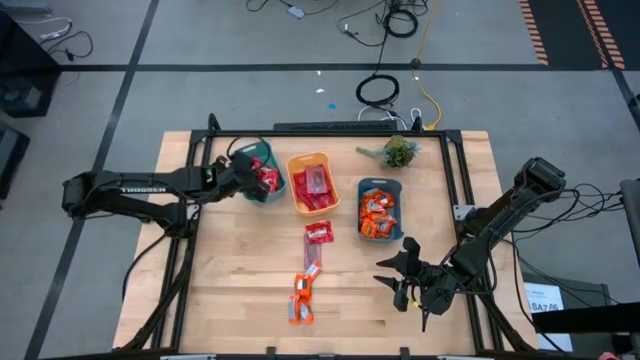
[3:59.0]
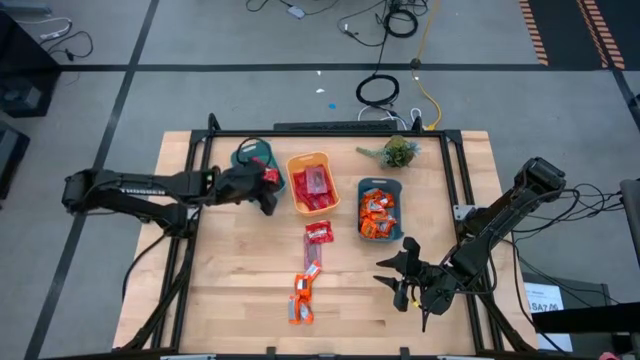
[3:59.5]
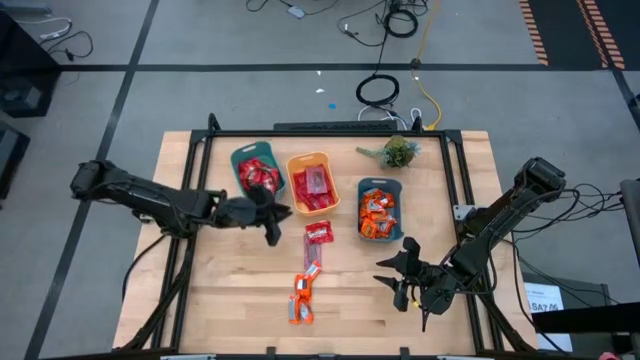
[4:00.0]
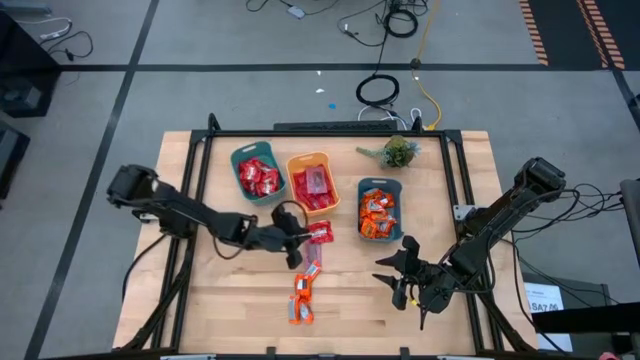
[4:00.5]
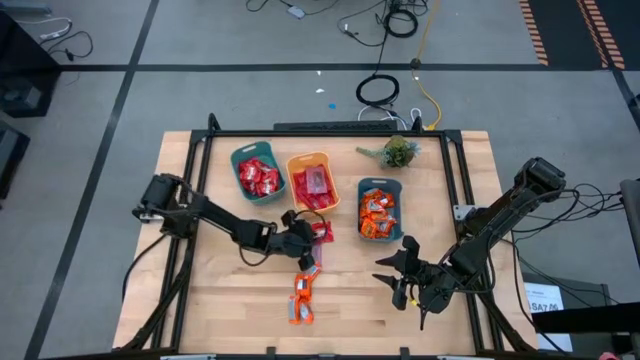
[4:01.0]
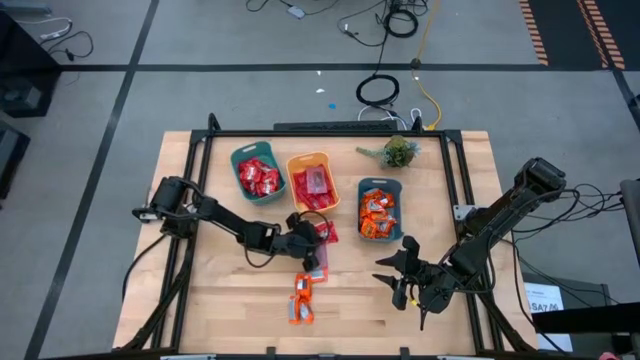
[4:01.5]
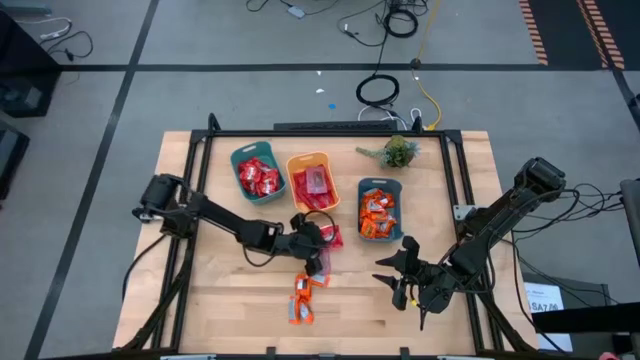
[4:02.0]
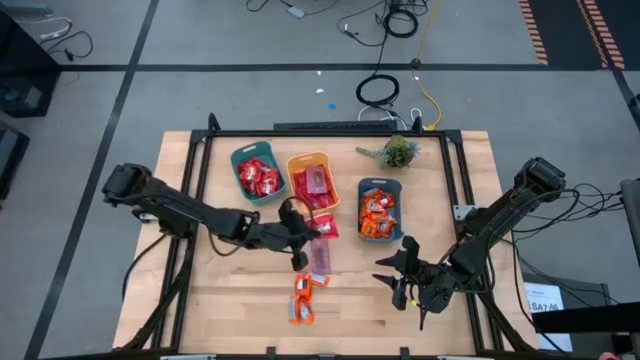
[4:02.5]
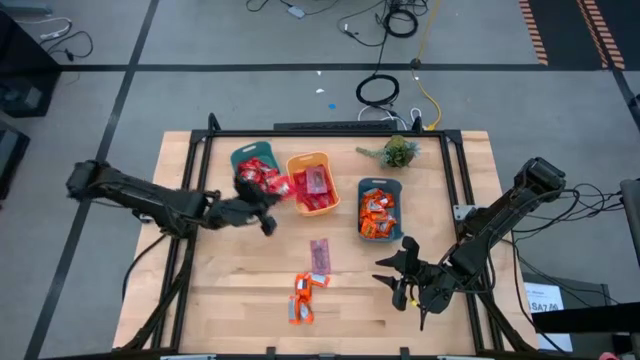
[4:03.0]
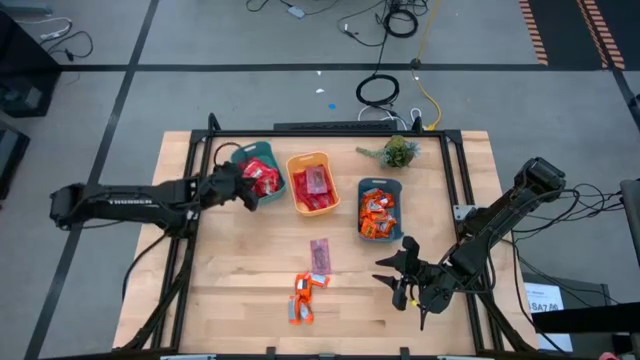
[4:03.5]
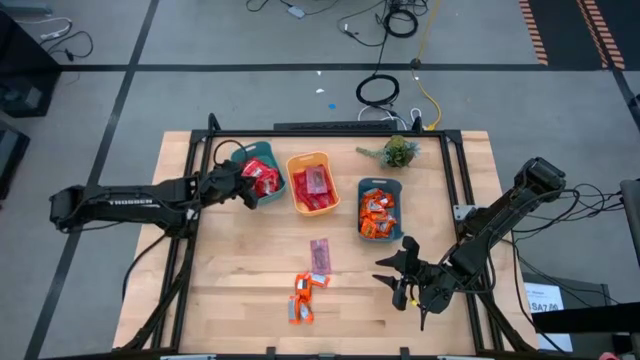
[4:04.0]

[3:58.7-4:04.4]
Task: Sort candy
Put the red pack of candy into the light blue bin

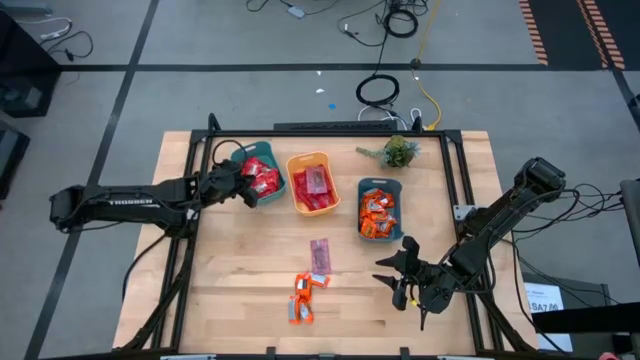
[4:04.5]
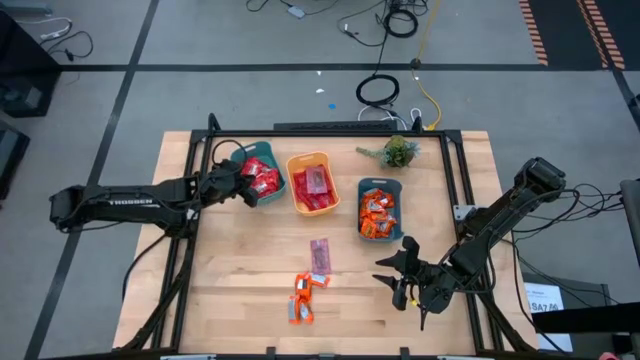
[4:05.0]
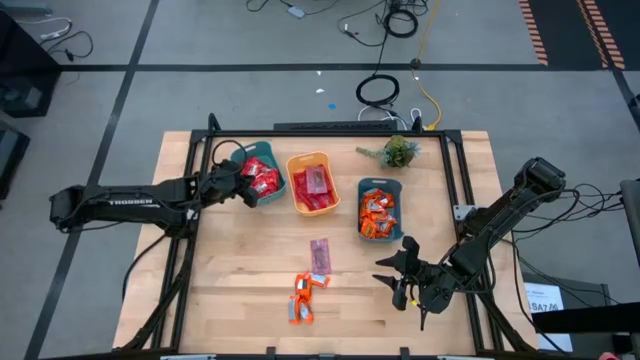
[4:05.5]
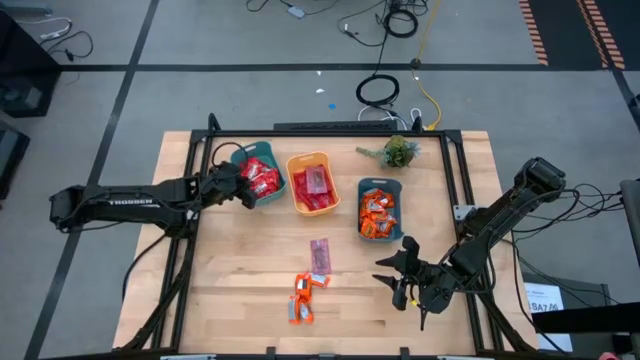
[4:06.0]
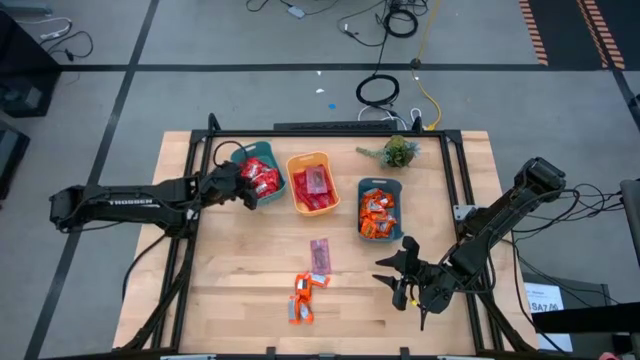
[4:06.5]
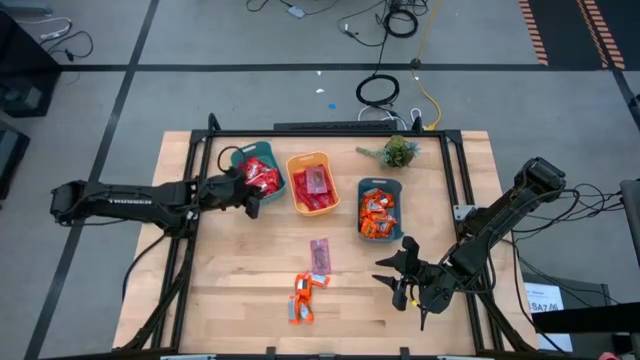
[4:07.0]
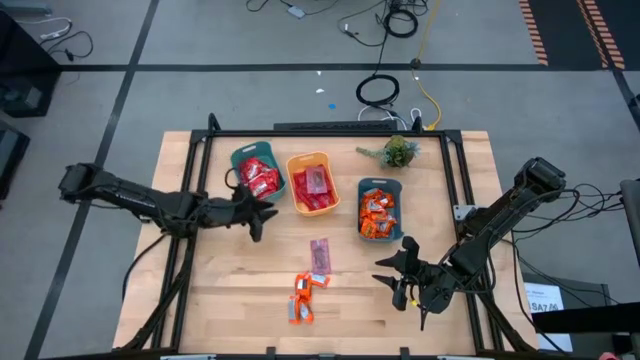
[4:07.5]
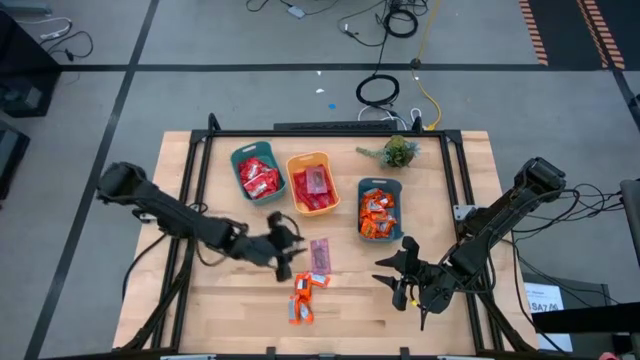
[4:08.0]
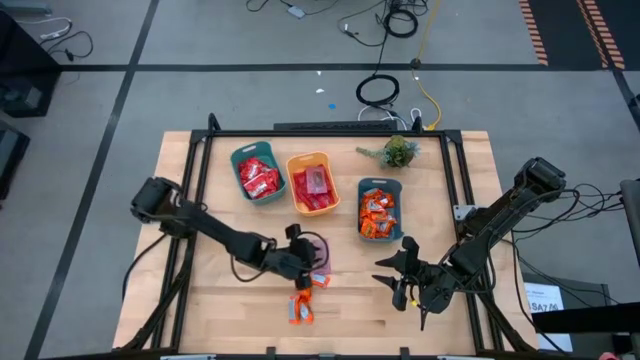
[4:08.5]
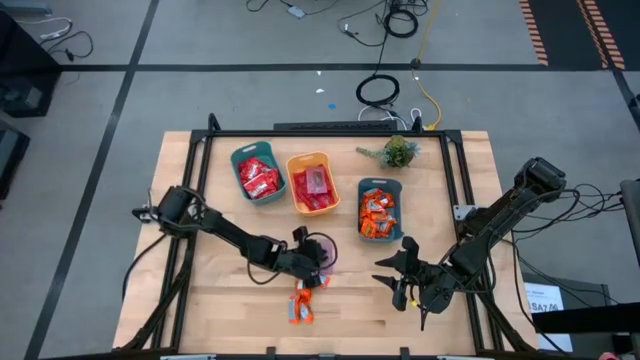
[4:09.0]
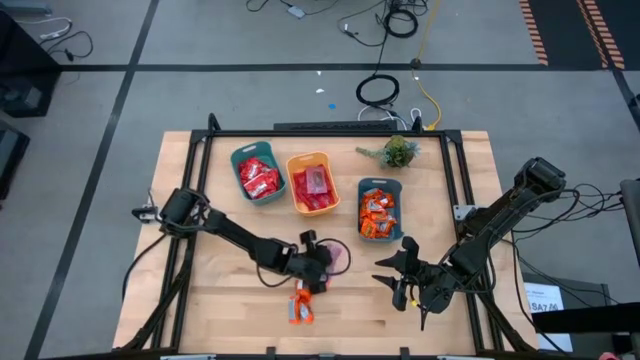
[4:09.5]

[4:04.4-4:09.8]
Put the pink wrapper gummy into the yellow bin

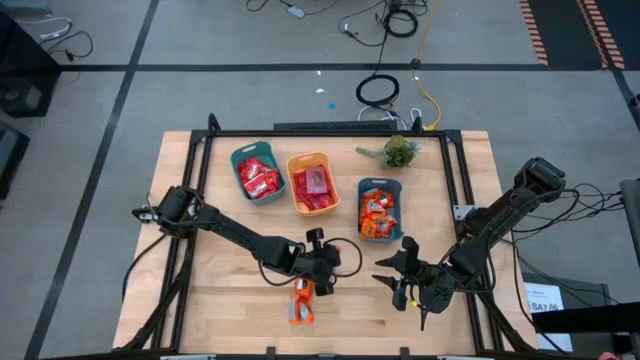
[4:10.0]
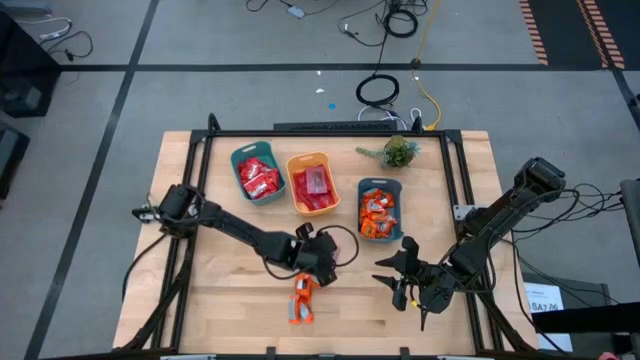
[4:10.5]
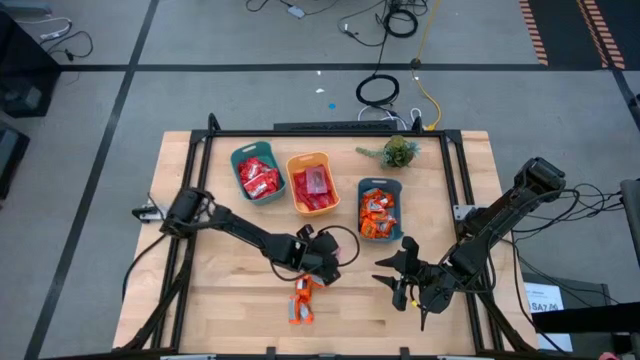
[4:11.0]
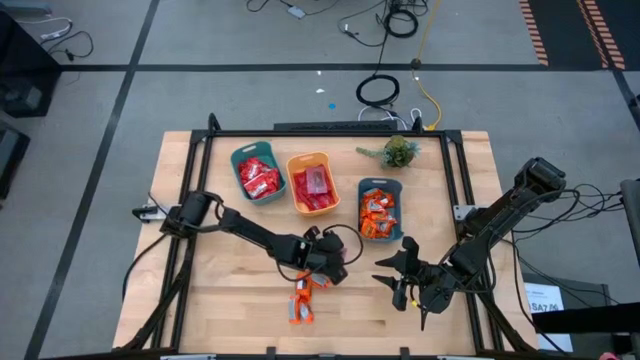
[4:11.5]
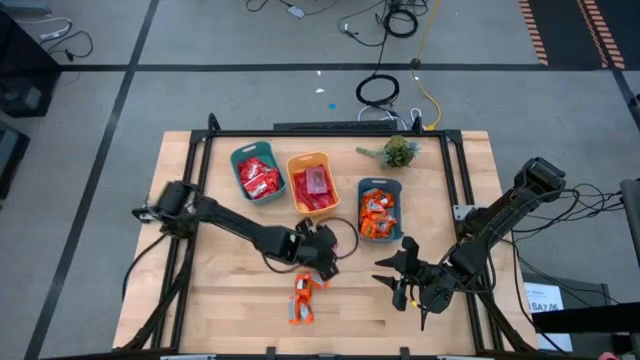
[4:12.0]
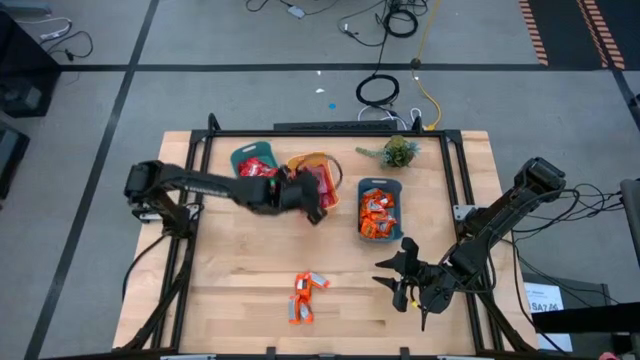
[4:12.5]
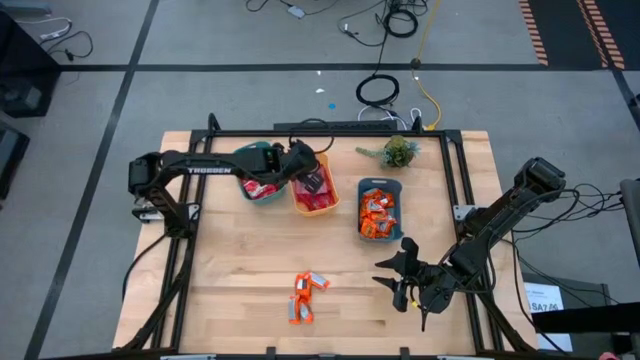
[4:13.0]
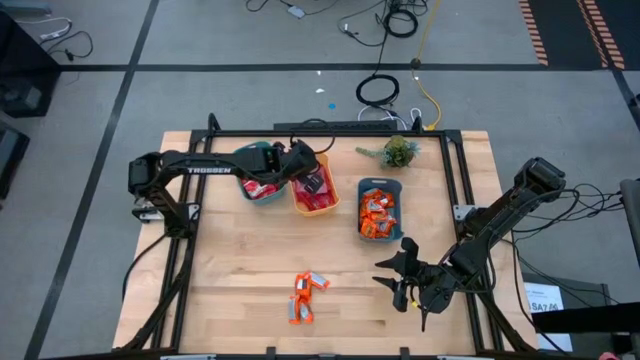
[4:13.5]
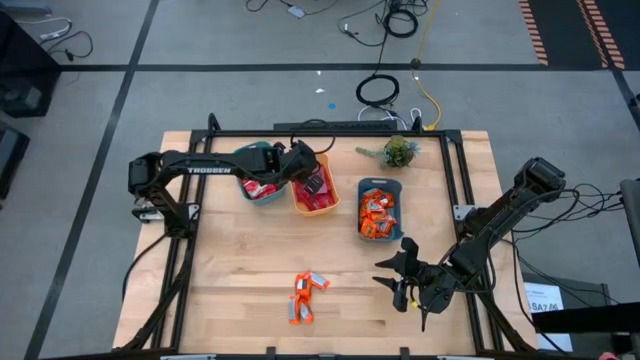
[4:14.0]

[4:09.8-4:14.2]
Put the pink wrapper gummy into the yellow bin

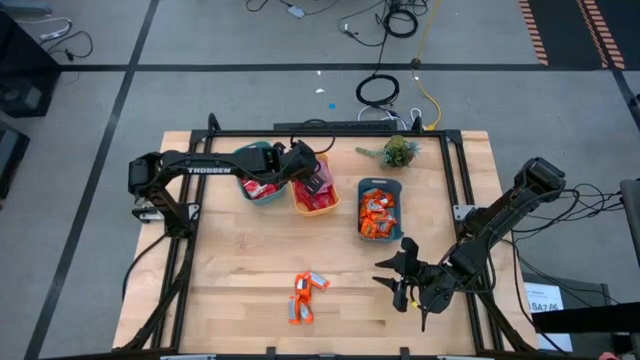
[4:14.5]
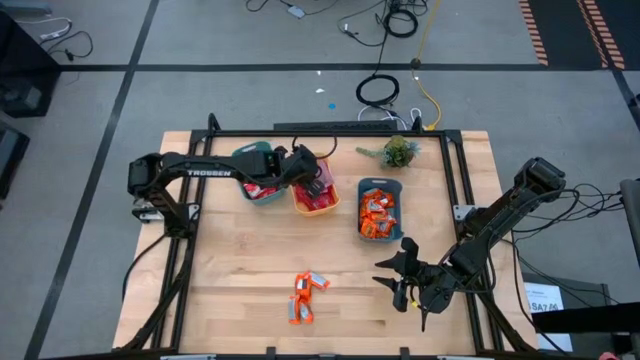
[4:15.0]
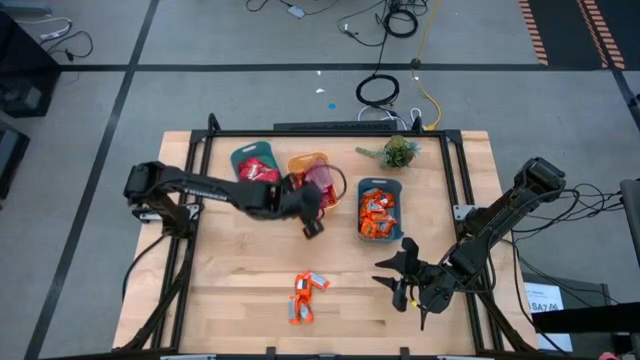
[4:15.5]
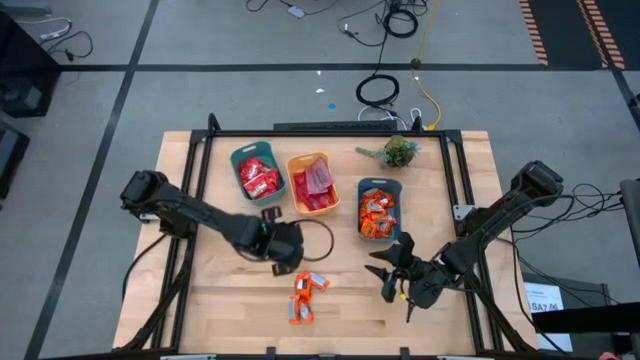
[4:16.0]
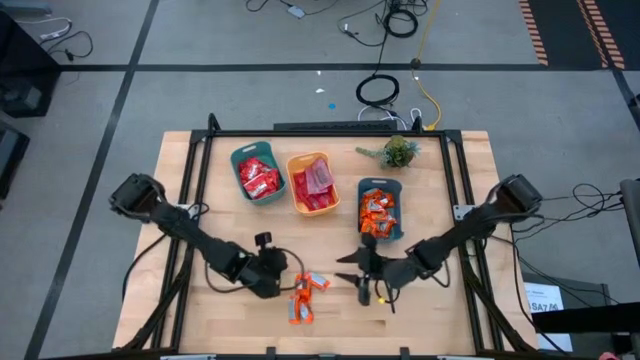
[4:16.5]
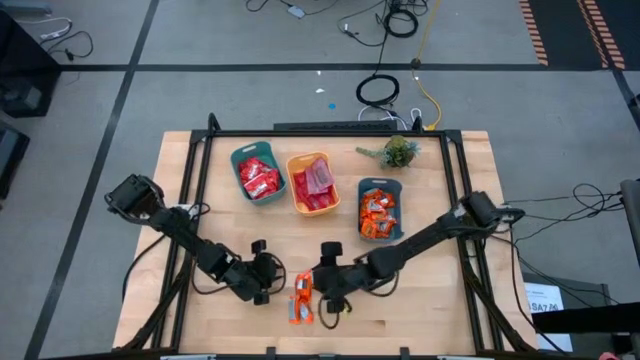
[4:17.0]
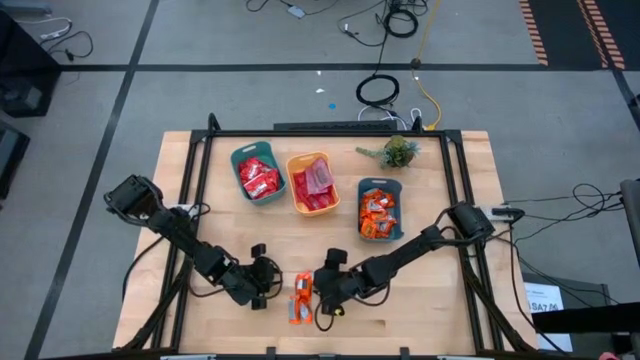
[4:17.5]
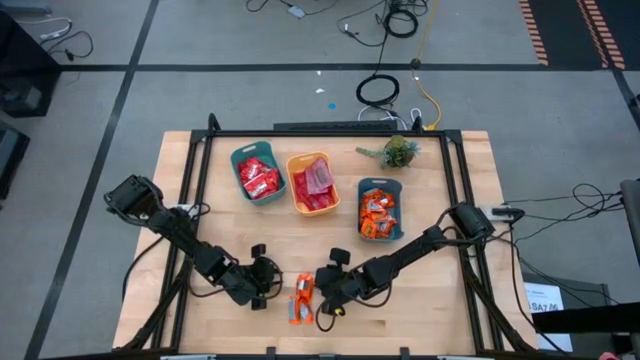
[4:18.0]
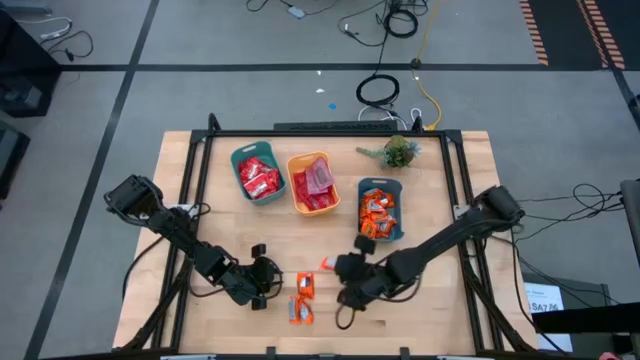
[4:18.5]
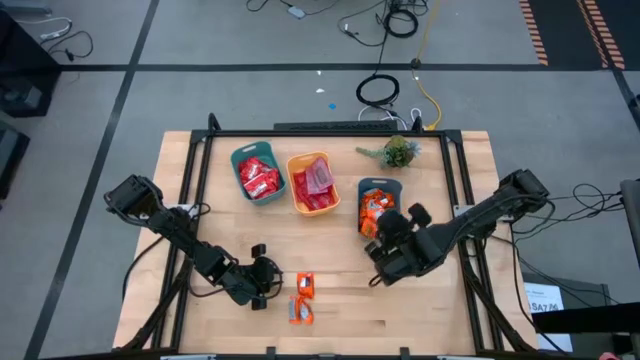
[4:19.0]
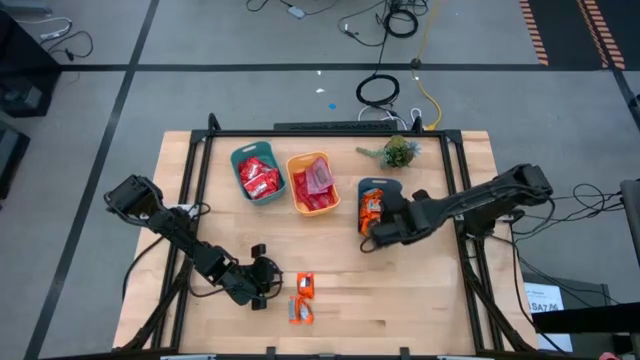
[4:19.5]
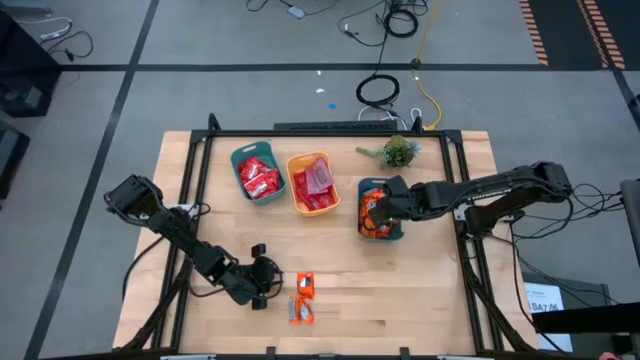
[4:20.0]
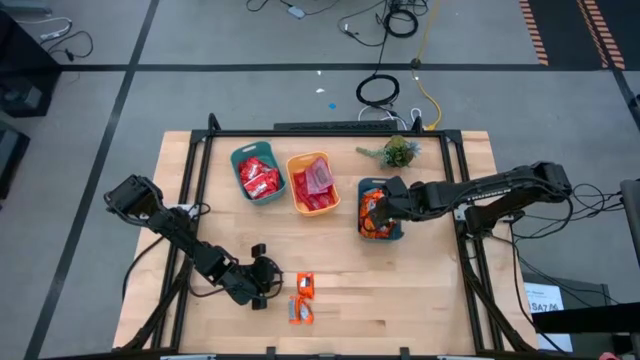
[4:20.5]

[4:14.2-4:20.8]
Put the orange wrapper chocolate into the dark blue bin
